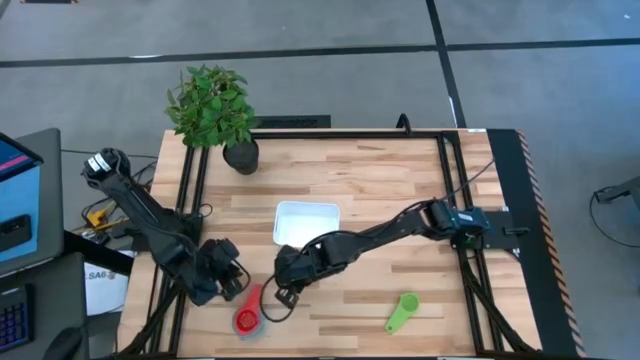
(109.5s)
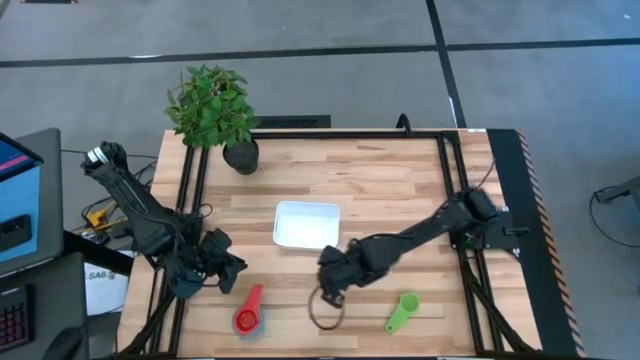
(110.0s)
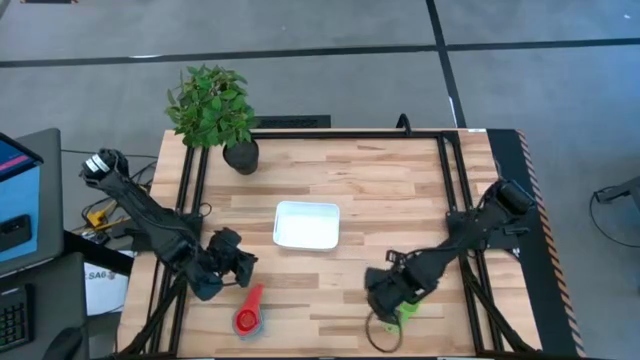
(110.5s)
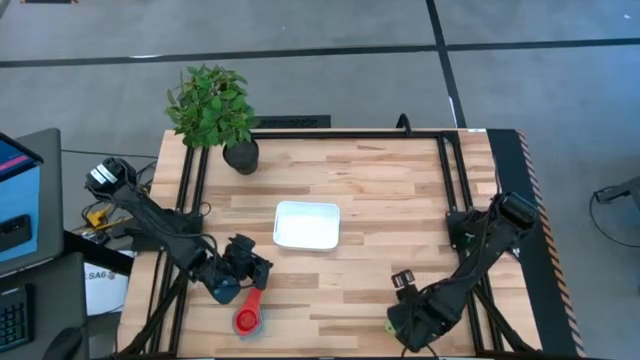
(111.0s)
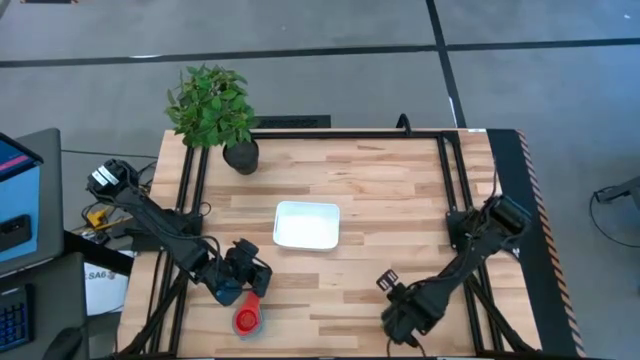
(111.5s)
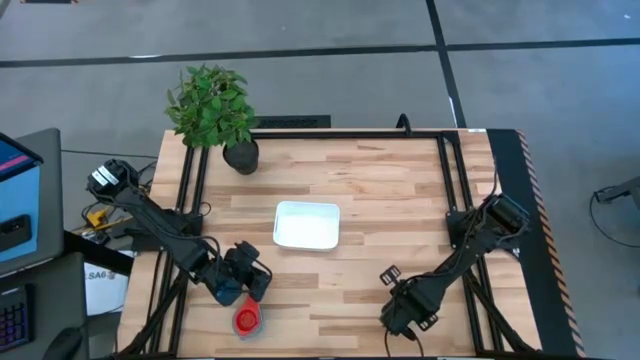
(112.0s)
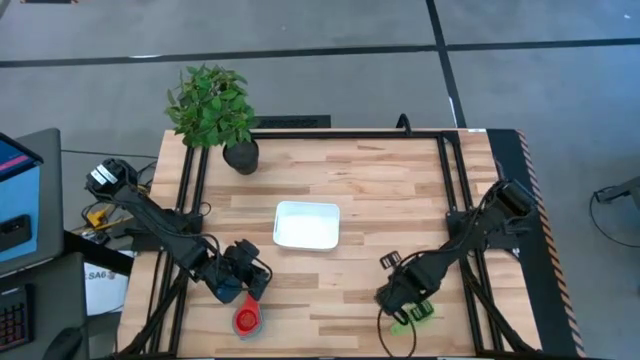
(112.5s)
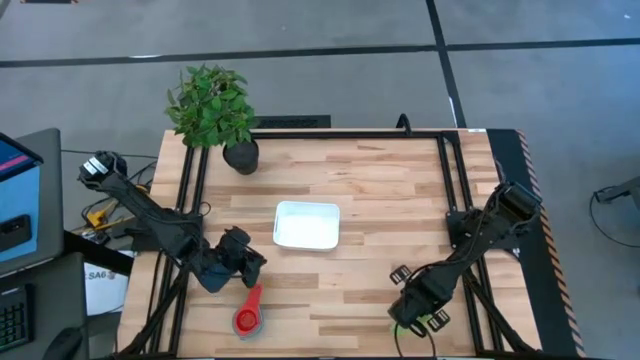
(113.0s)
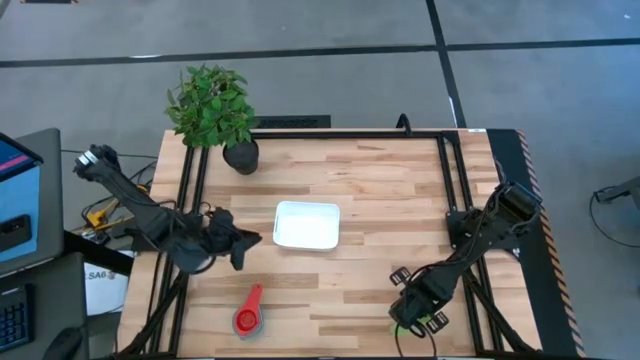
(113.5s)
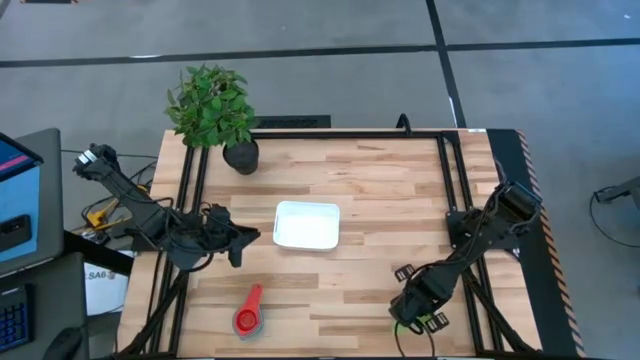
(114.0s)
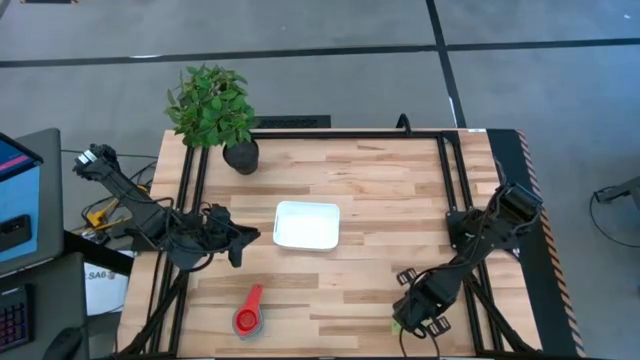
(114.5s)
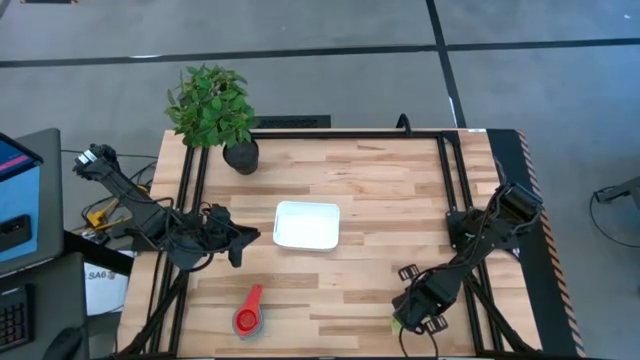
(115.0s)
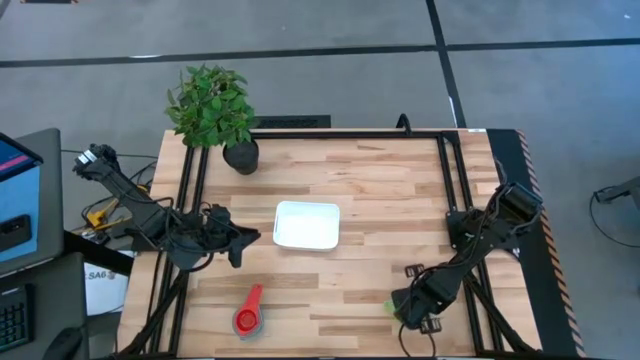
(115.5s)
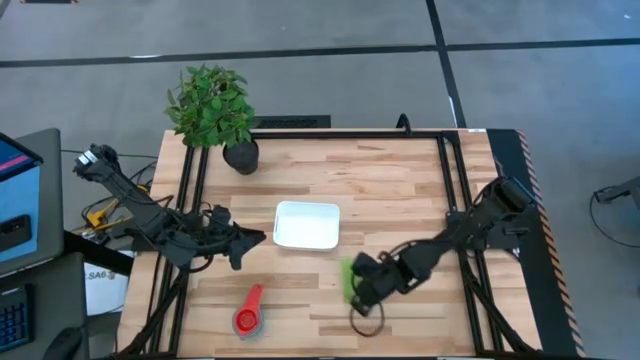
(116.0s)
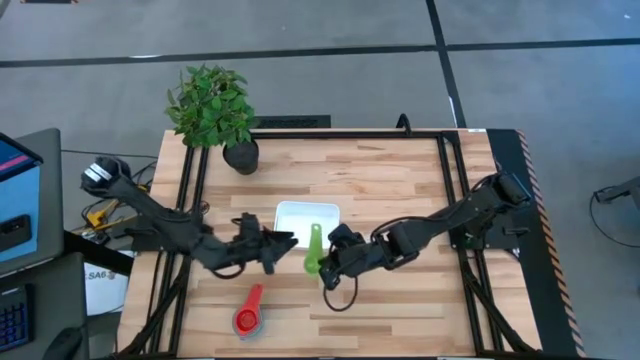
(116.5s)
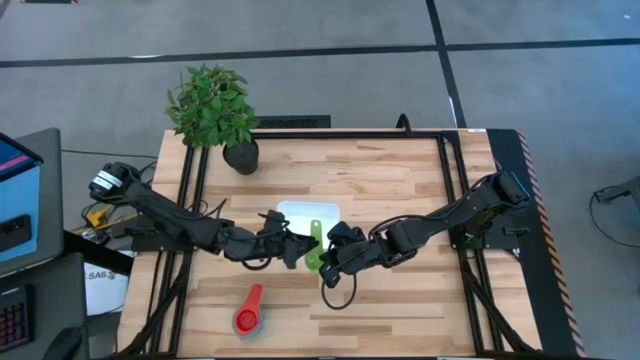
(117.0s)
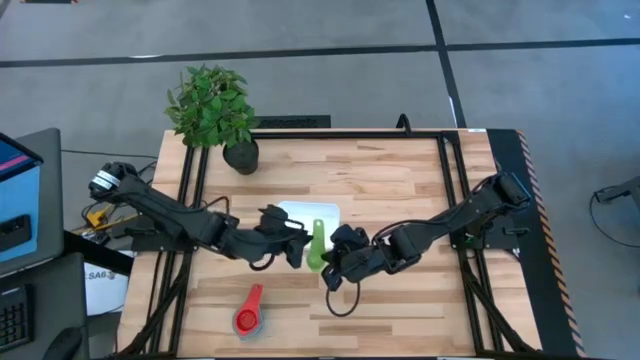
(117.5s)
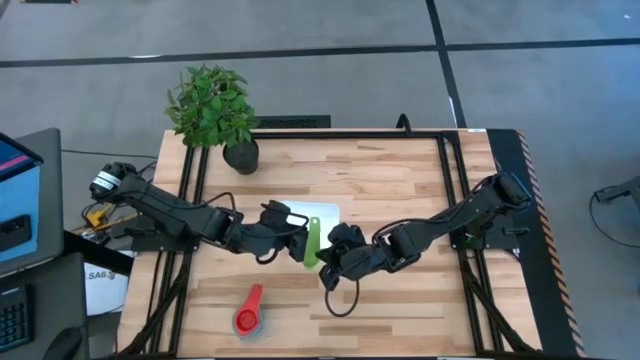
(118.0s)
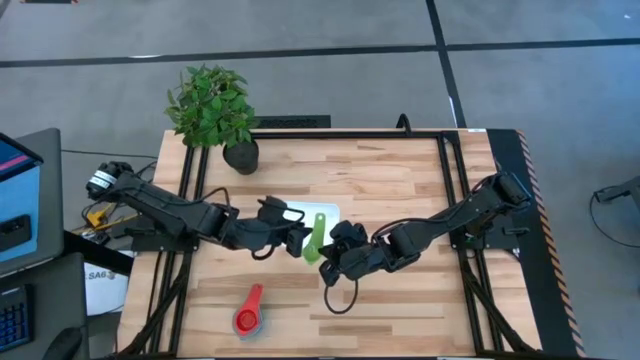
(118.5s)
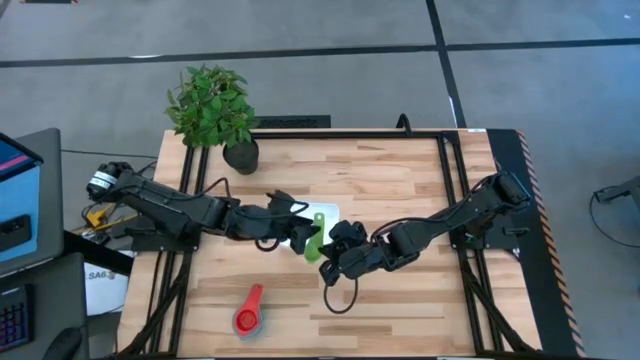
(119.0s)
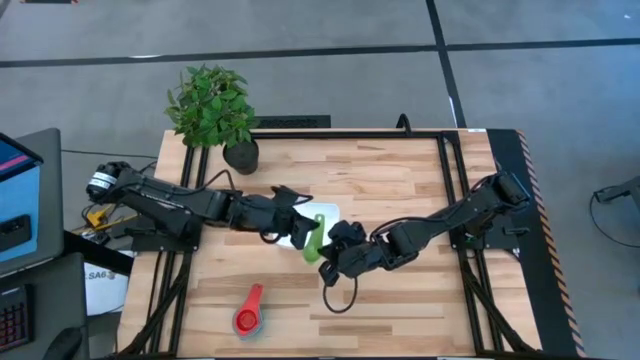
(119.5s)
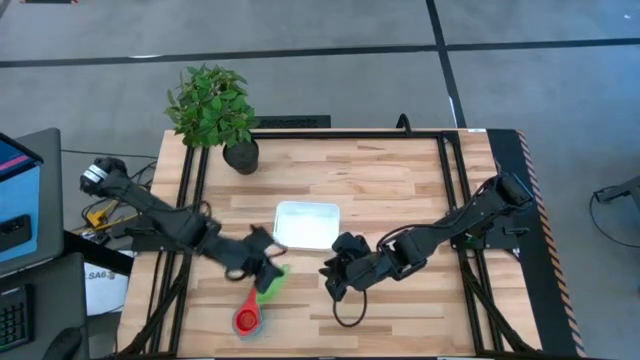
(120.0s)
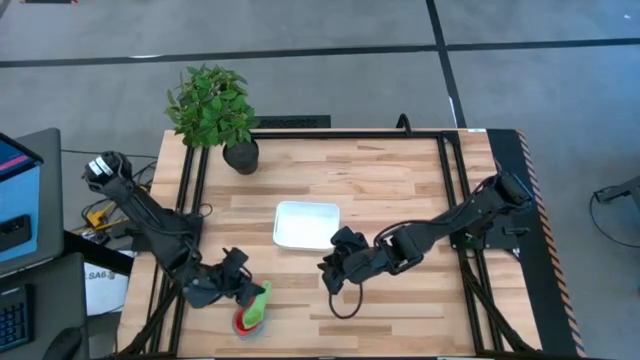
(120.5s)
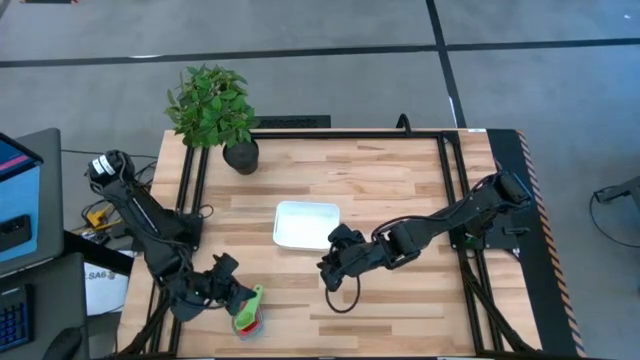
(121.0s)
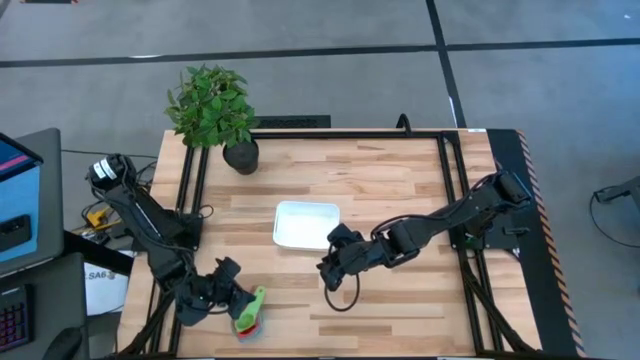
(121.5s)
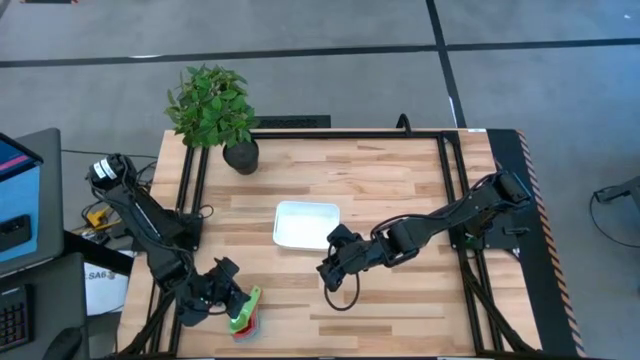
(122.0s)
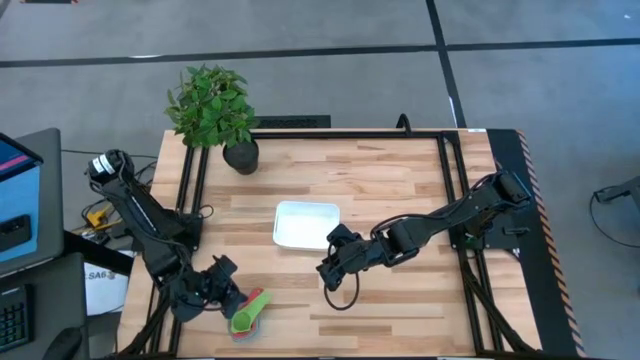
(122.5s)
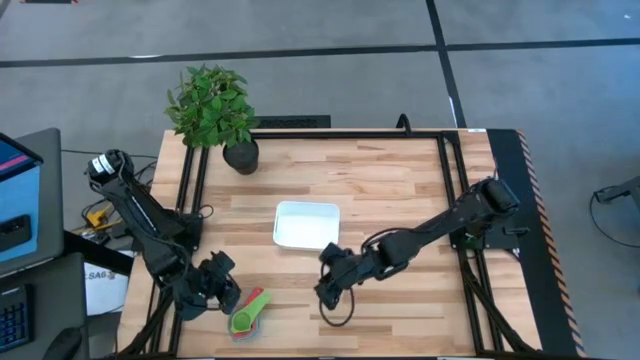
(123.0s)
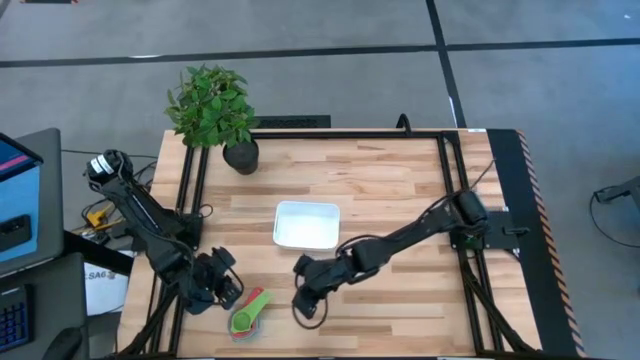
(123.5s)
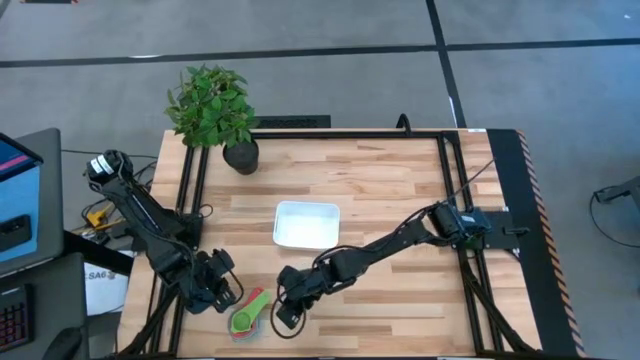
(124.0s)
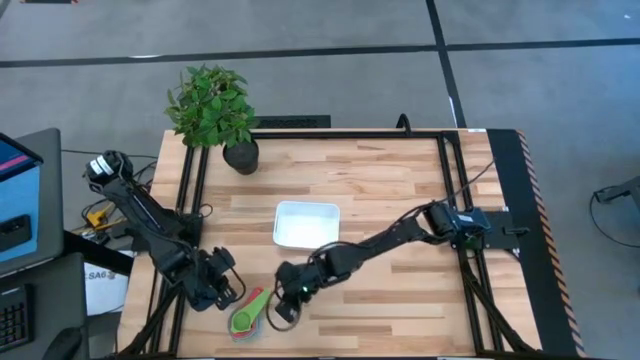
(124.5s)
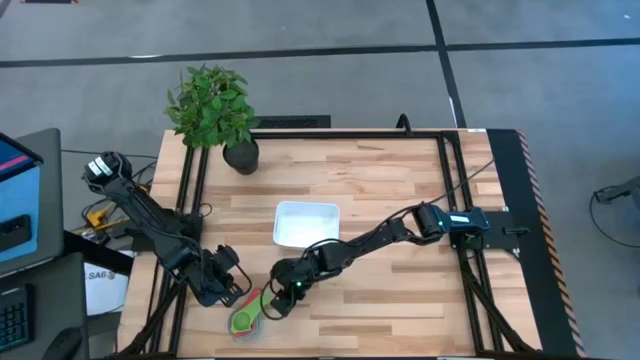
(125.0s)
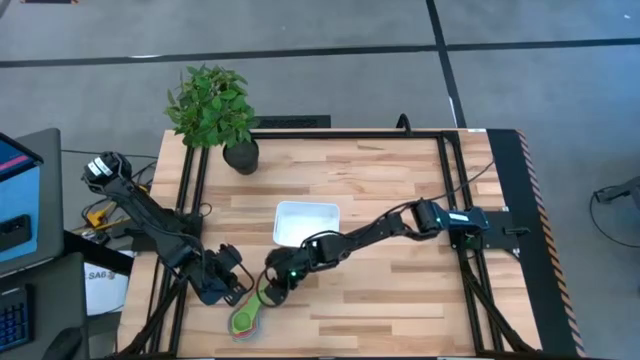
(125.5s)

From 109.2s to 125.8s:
Task: Nest measuring cups in basket
Stack the green measuring cup into the red measuring cup

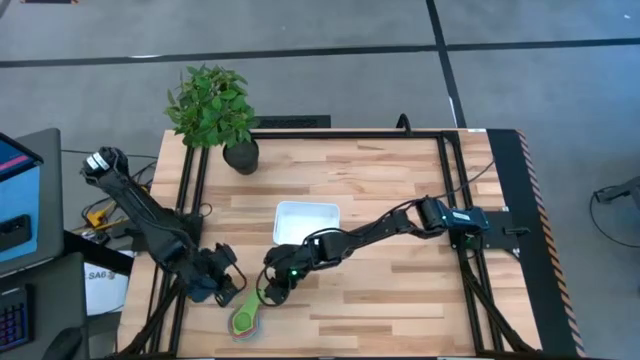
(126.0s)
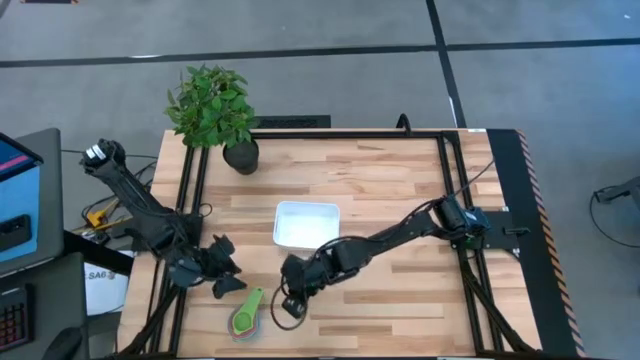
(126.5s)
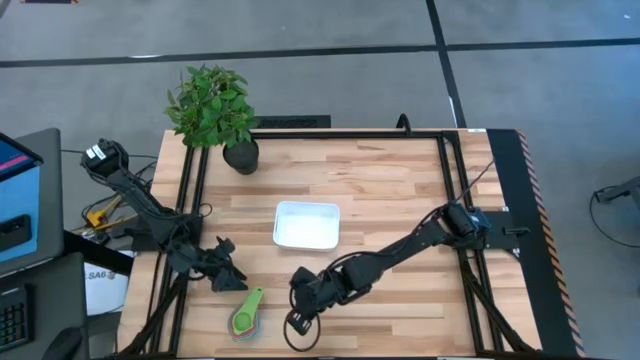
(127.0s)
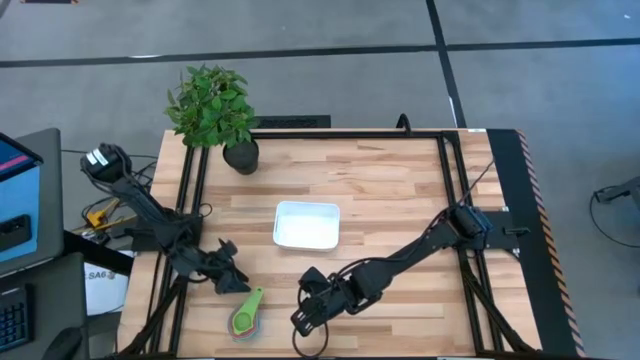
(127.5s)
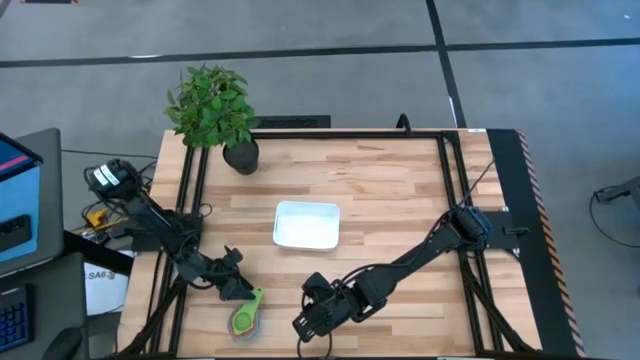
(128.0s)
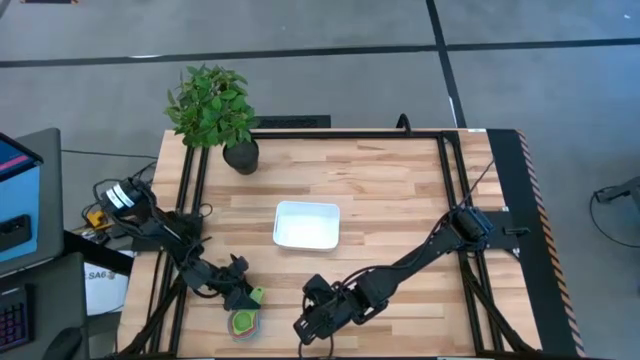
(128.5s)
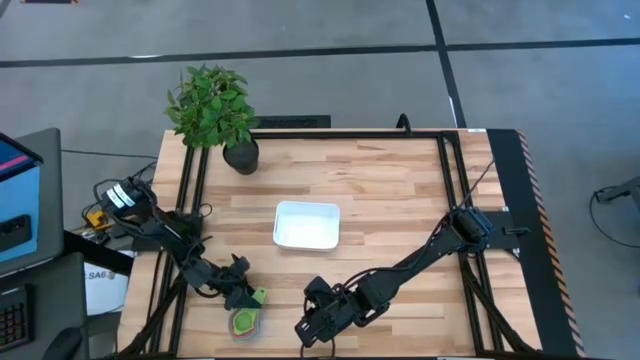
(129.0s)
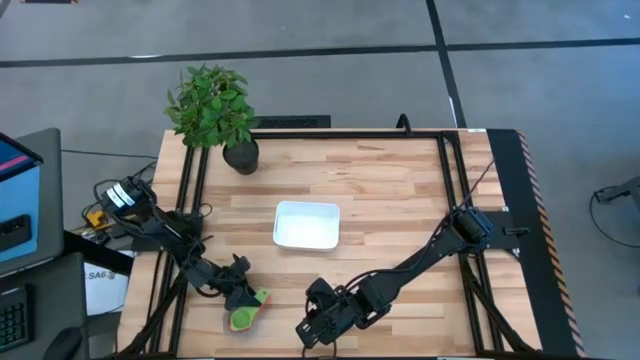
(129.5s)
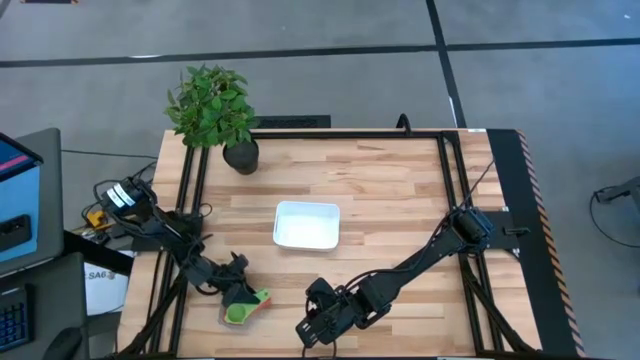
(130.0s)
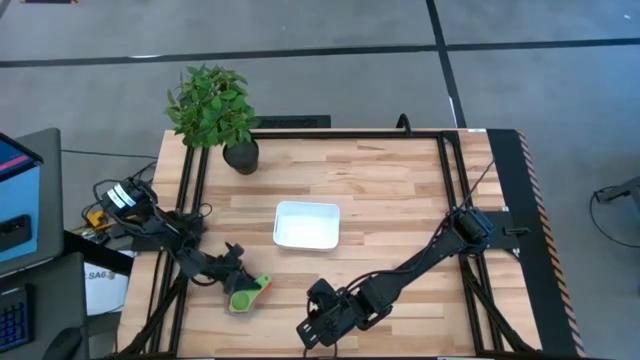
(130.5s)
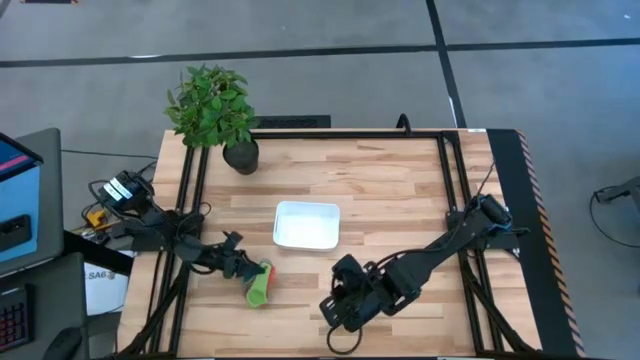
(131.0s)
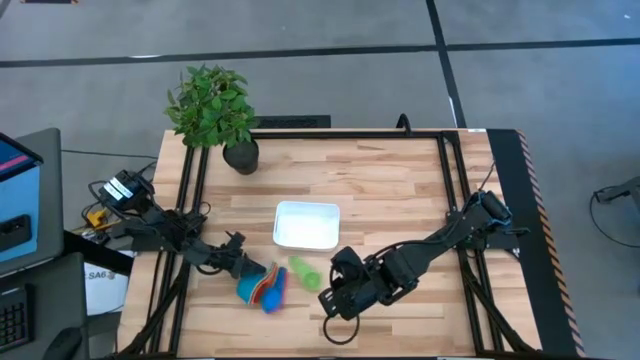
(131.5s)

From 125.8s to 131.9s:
Put the measuring cups into the white bin
